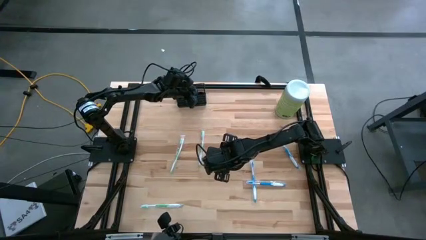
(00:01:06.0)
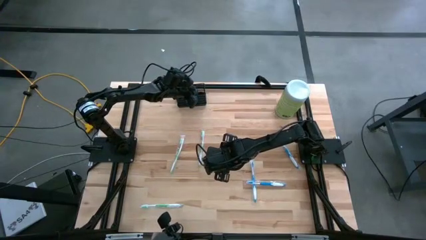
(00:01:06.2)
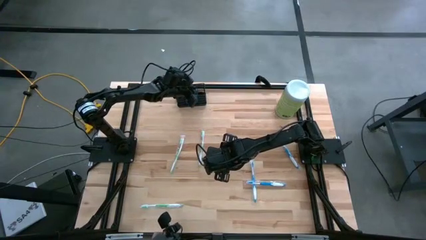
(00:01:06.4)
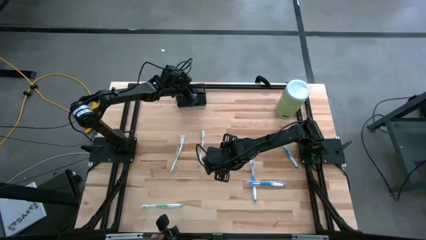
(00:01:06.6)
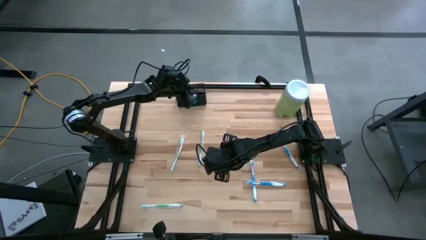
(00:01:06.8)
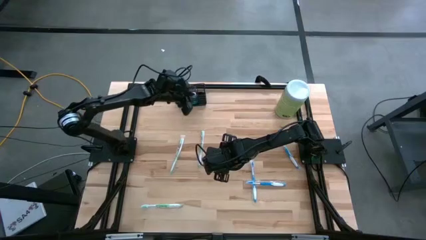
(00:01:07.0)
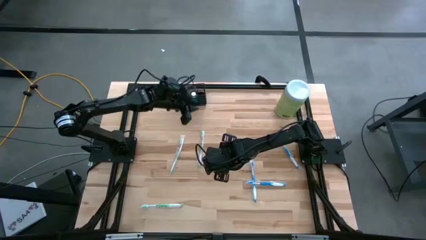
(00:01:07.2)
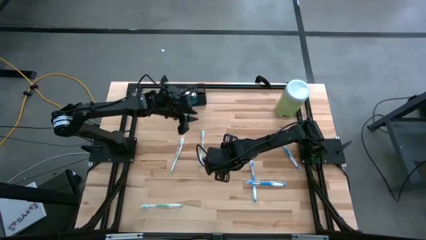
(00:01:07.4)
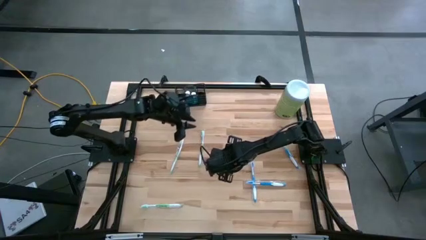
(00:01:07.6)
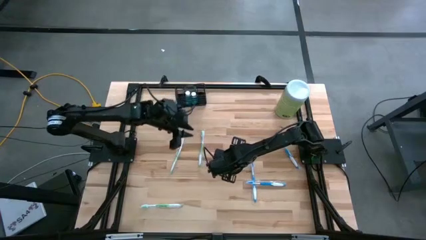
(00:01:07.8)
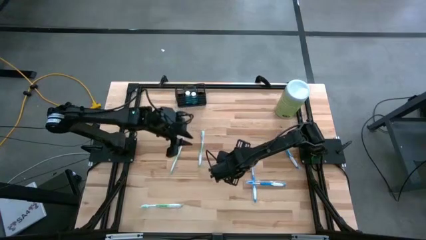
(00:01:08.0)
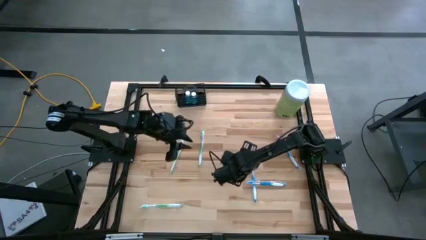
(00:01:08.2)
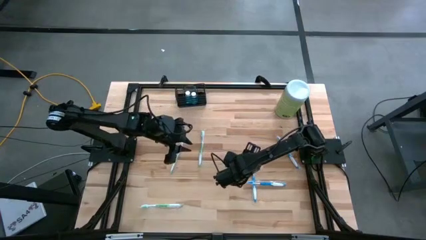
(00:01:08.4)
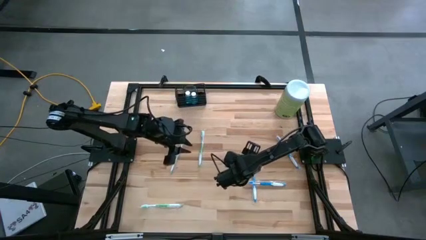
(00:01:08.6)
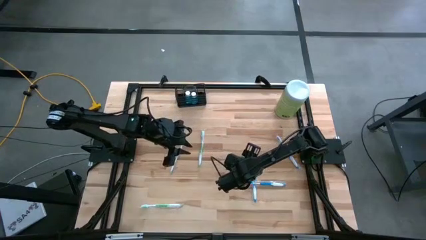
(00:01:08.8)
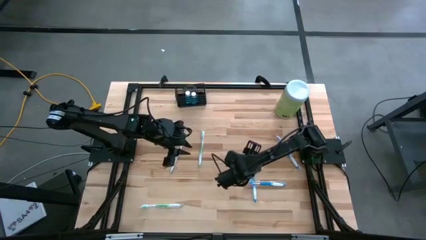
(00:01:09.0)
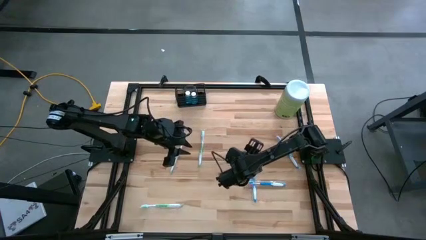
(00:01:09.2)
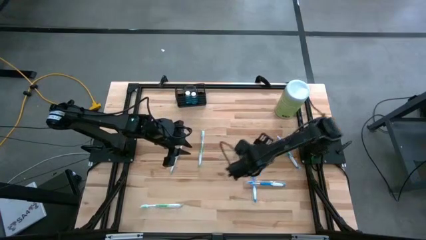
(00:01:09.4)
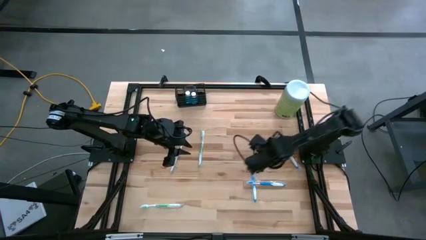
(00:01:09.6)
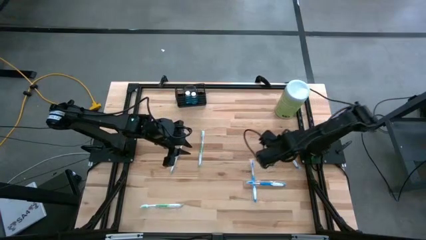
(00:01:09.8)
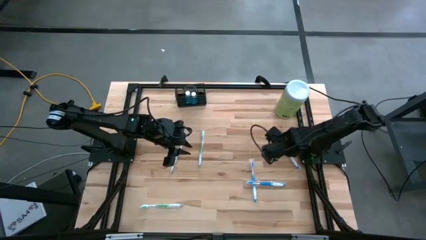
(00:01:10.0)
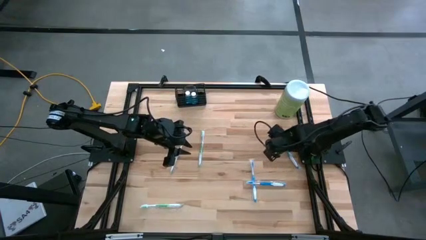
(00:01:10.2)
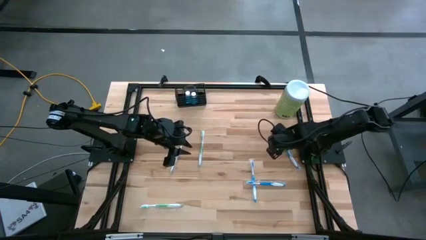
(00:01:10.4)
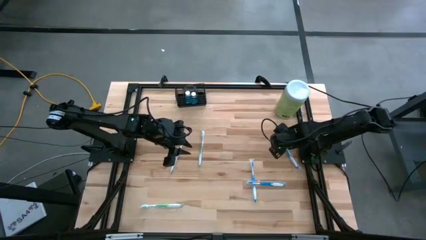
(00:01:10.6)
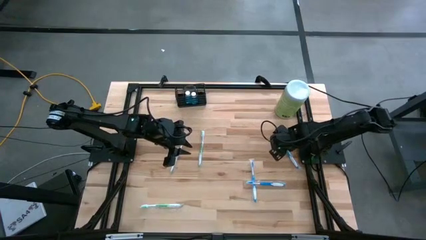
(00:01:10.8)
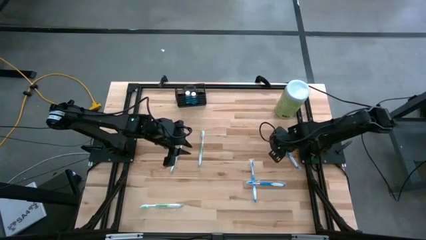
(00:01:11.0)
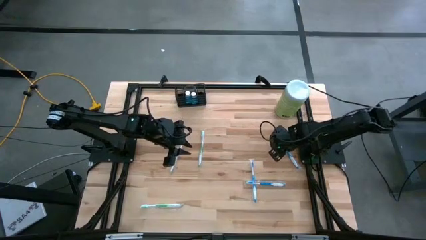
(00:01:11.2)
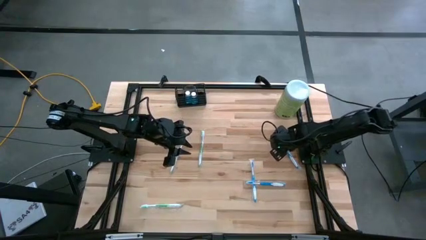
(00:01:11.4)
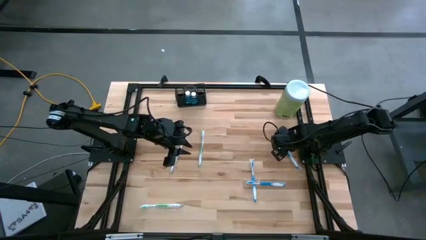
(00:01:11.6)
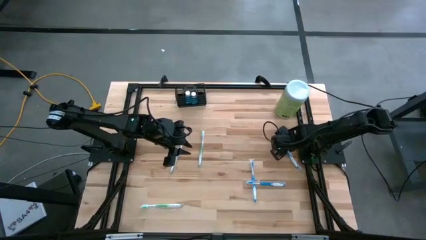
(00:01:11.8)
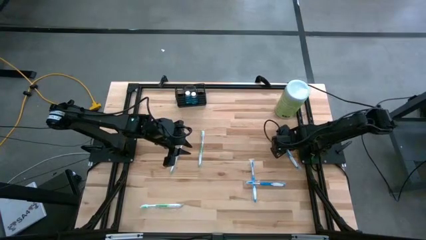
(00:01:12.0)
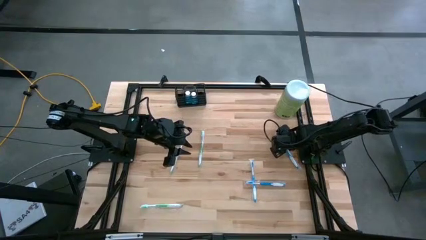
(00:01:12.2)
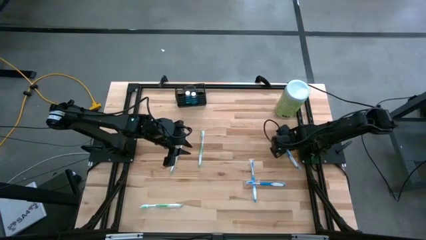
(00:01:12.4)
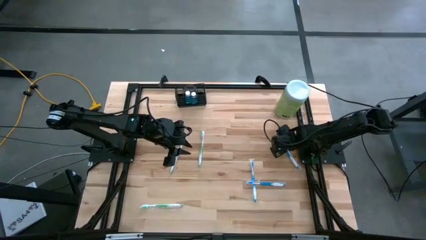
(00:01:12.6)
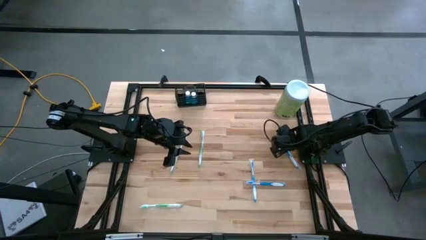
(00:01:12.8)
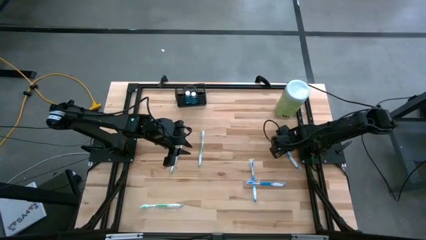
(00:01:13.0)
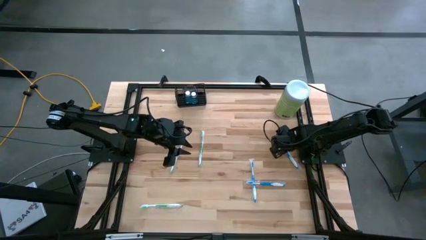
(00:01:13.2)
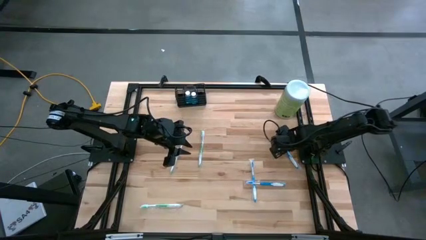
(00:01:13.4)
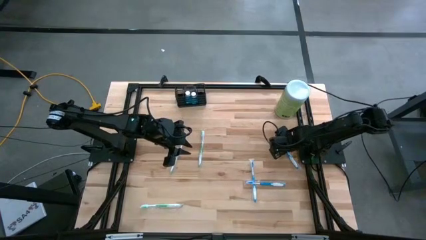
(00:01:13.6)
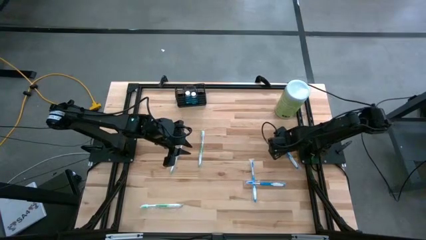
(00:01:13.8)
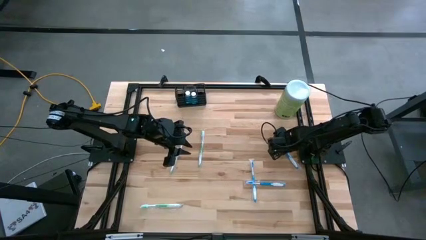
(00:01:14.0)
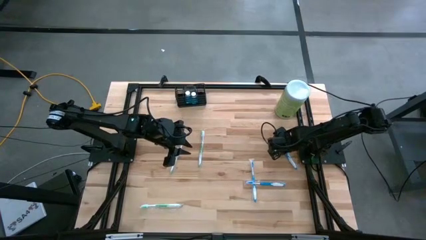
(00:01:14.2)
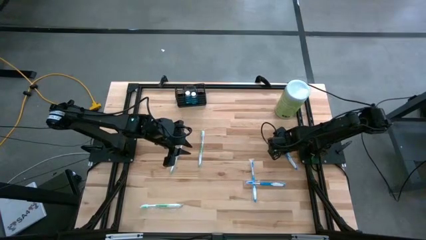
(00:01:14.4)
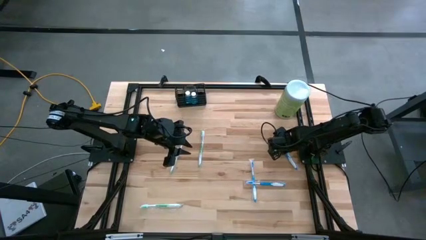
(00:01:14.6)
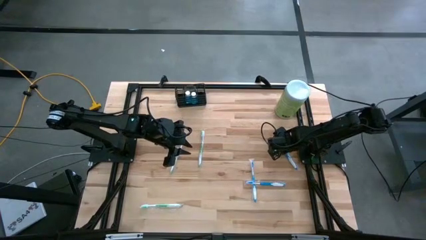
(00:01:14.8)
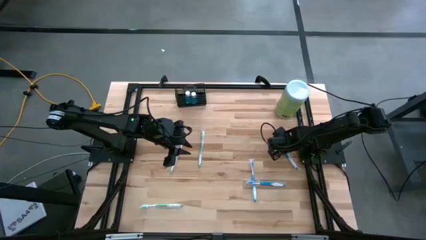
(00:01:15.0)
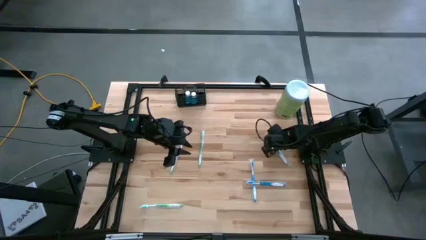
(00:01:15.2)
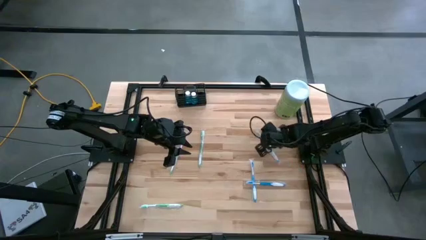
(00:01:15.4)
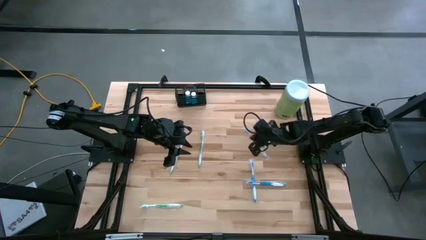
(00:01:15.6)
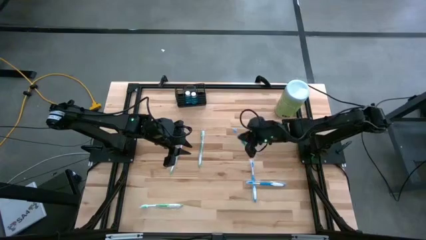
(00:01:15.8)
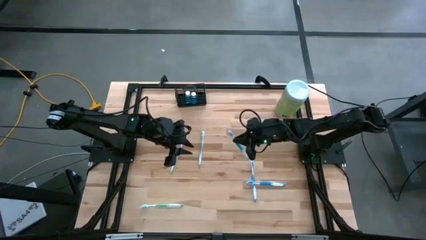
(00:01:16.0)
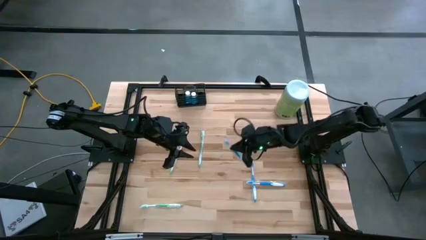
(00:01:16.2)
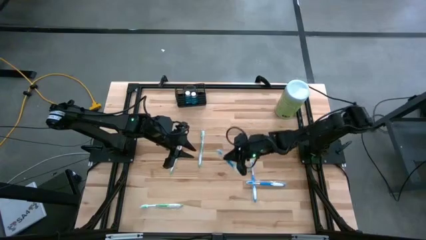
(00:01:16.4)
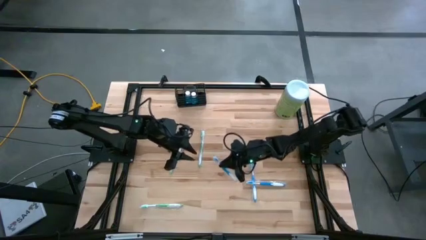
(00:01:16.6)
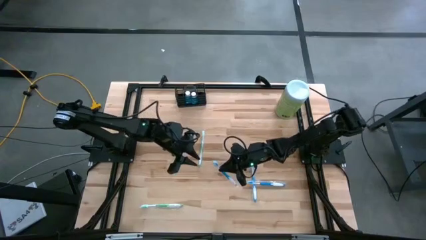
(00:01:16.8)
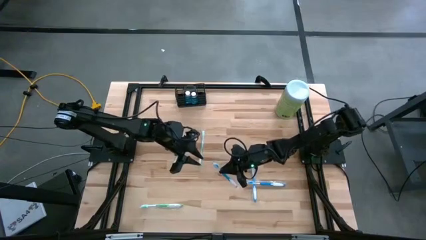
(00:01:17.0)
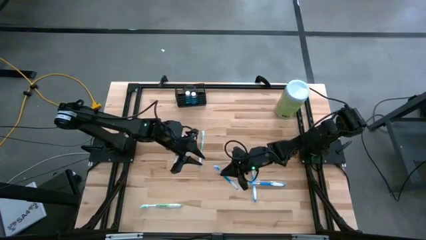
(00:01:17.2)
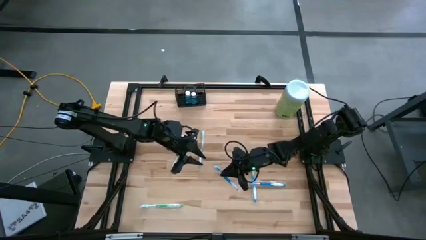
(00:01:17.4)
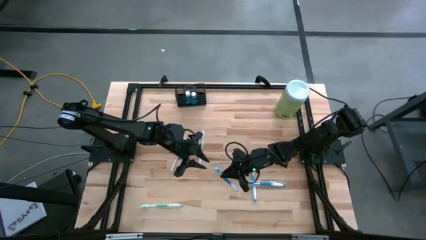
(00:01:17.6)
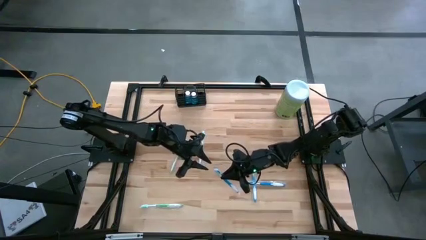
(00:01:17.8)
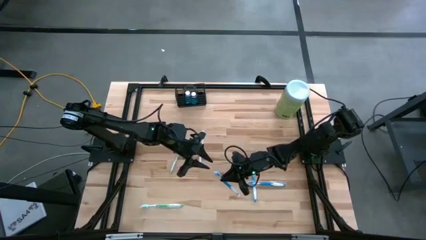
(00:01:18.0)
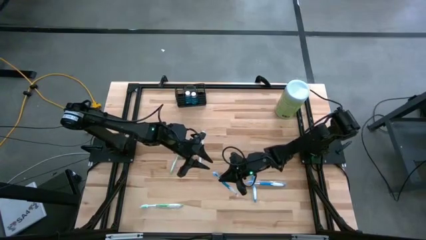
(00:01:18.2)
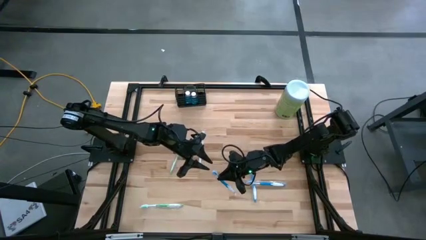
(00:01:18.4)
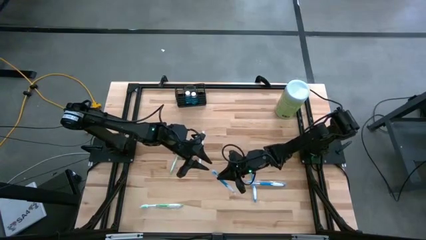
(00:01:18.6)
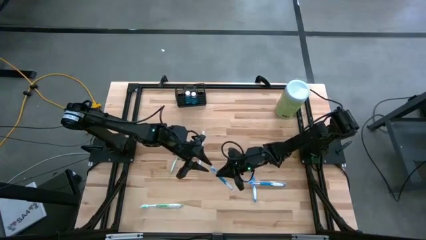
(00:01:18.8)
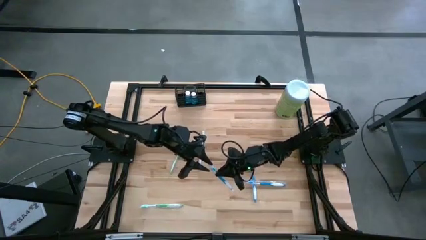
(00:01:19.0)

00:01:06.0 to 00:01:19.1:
Task: Pick & Place toothbrushing station
Put the top blue toothbrush into the wire organizer
